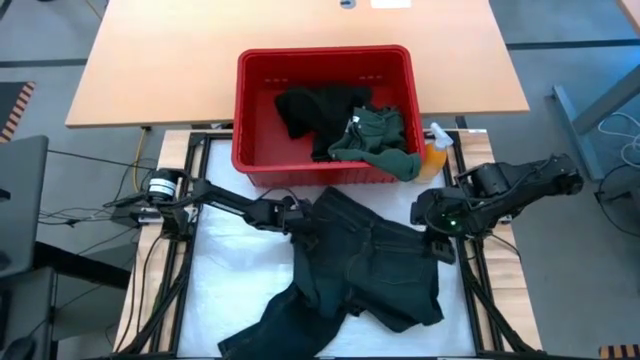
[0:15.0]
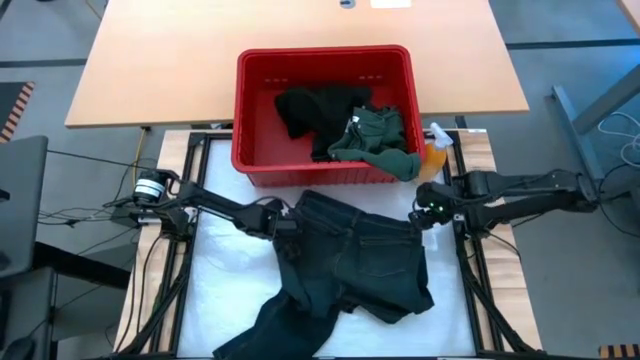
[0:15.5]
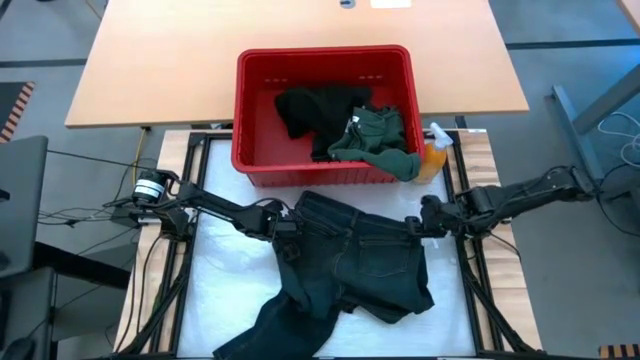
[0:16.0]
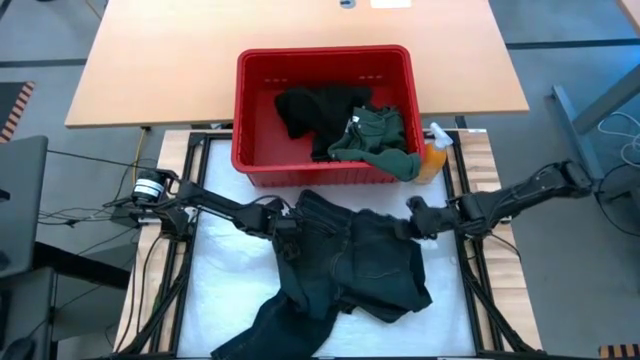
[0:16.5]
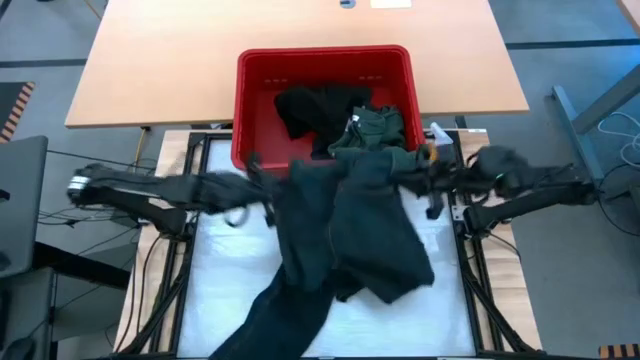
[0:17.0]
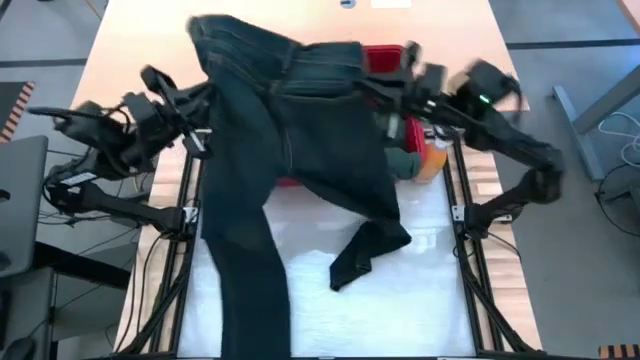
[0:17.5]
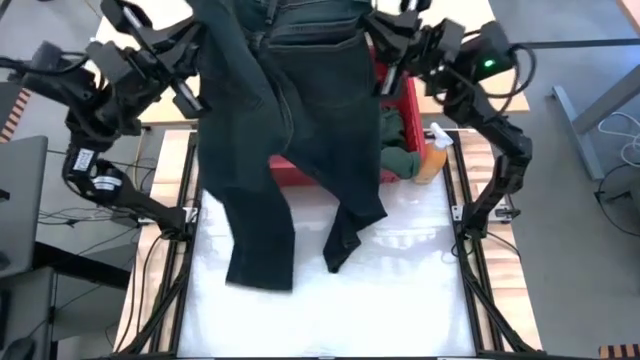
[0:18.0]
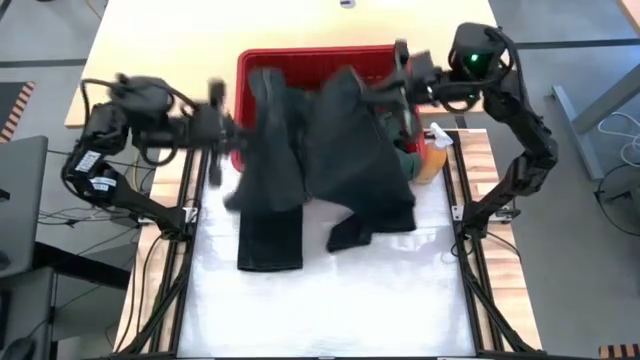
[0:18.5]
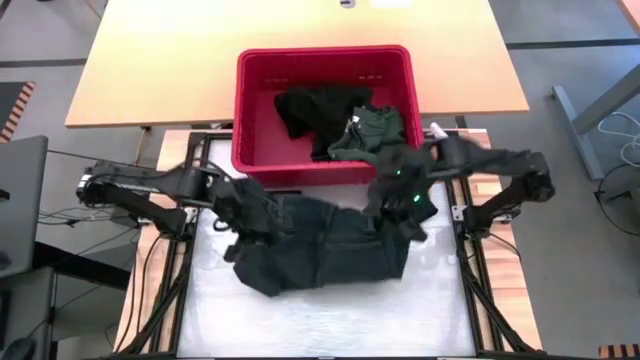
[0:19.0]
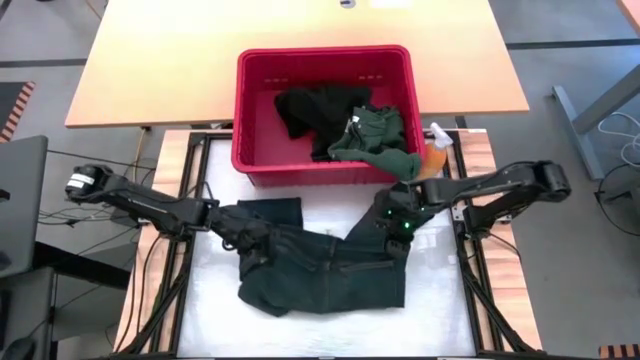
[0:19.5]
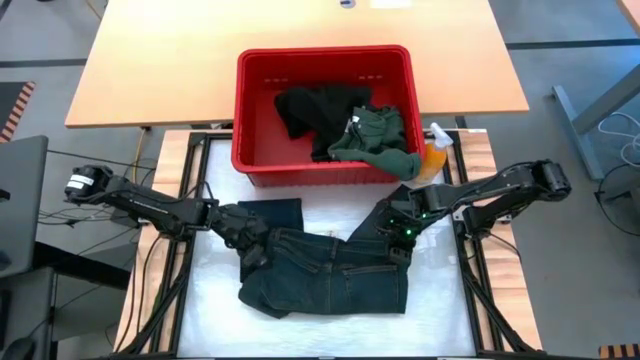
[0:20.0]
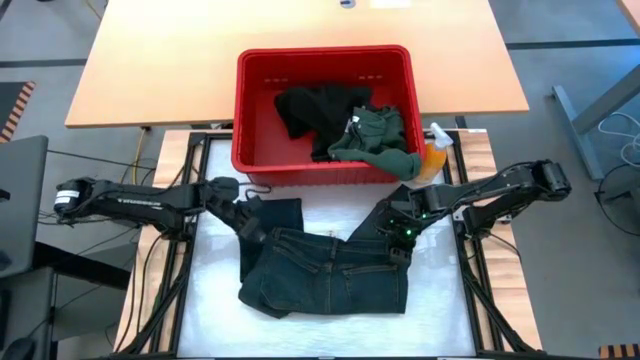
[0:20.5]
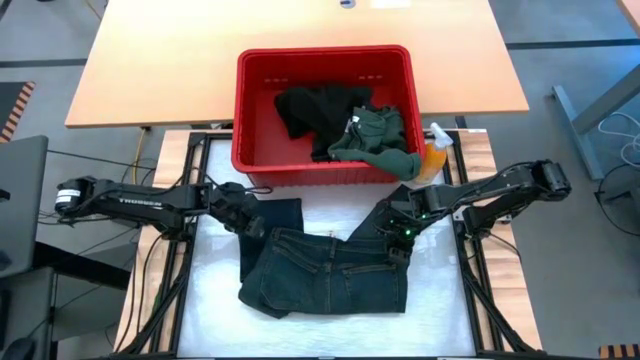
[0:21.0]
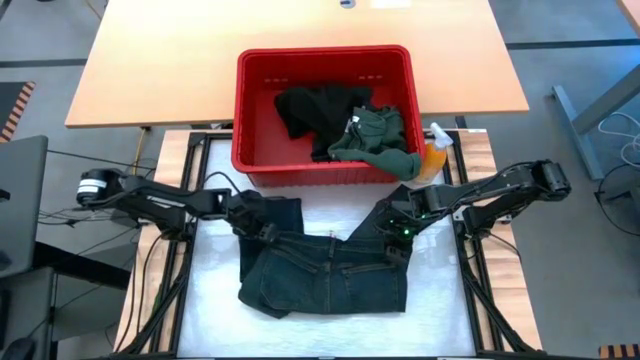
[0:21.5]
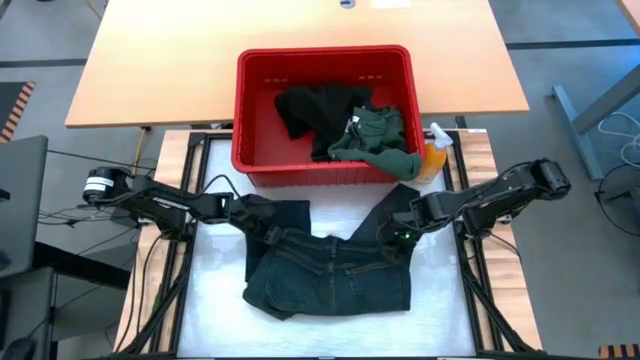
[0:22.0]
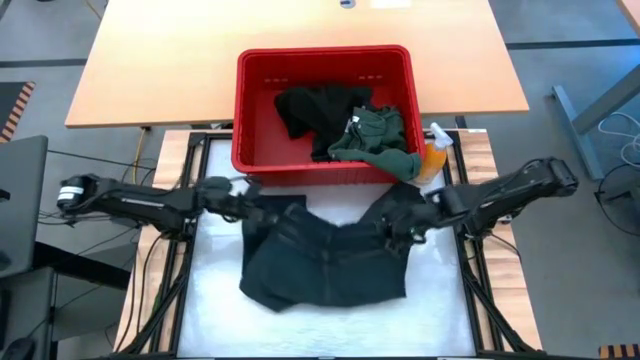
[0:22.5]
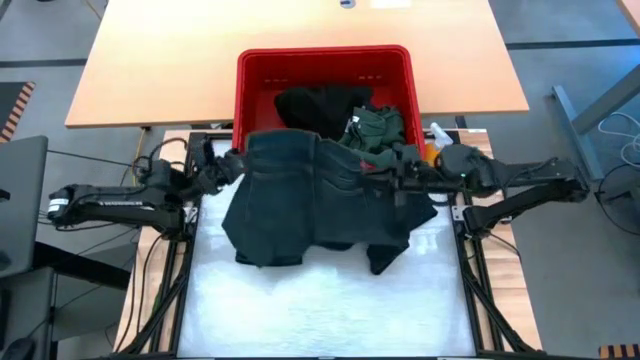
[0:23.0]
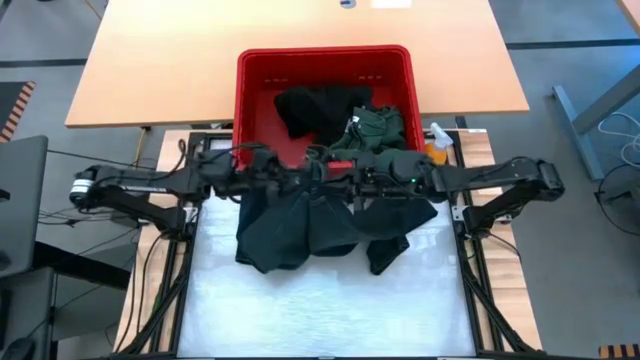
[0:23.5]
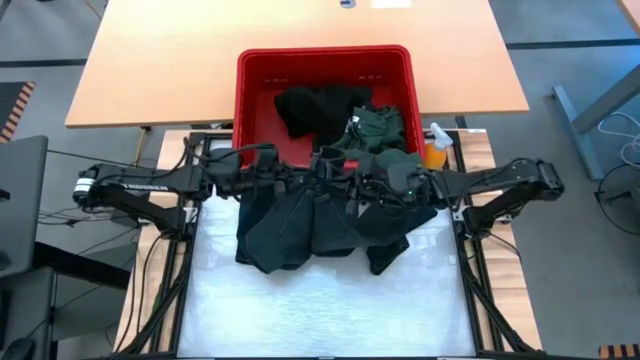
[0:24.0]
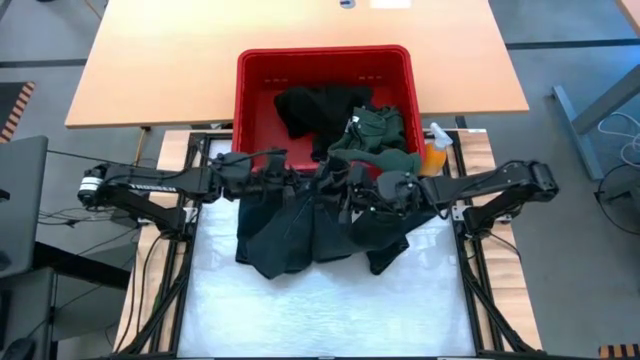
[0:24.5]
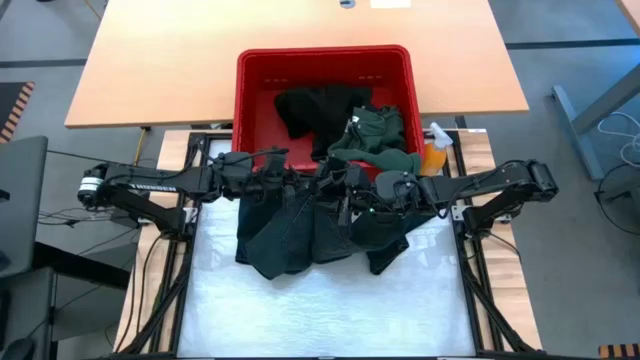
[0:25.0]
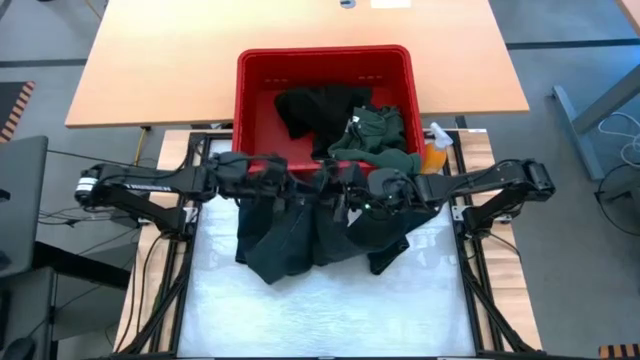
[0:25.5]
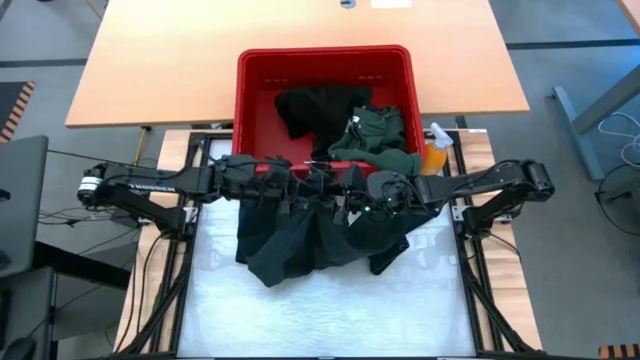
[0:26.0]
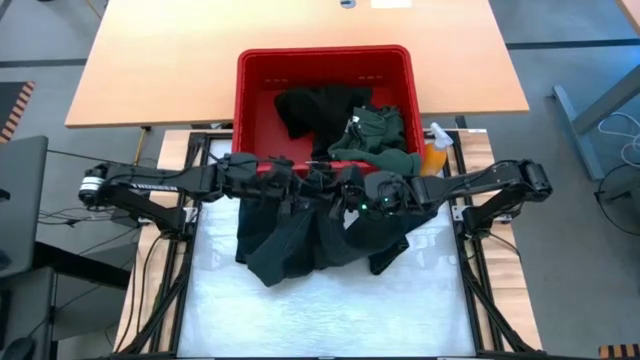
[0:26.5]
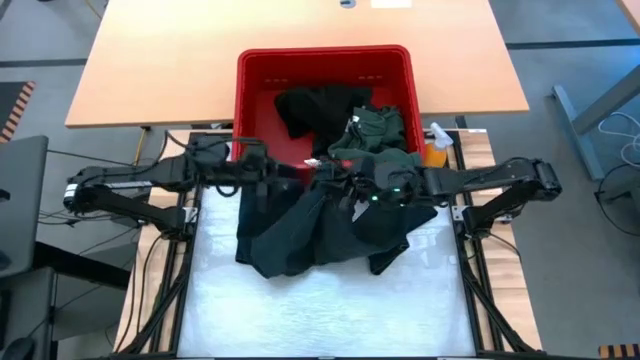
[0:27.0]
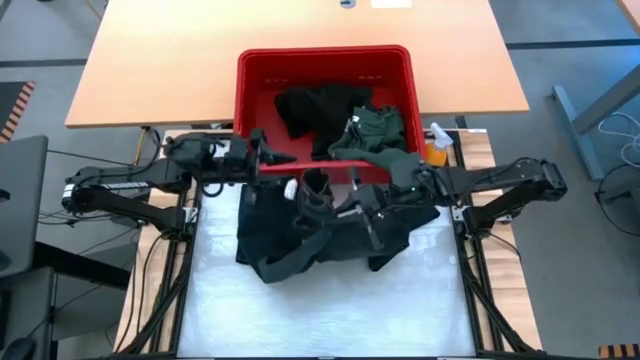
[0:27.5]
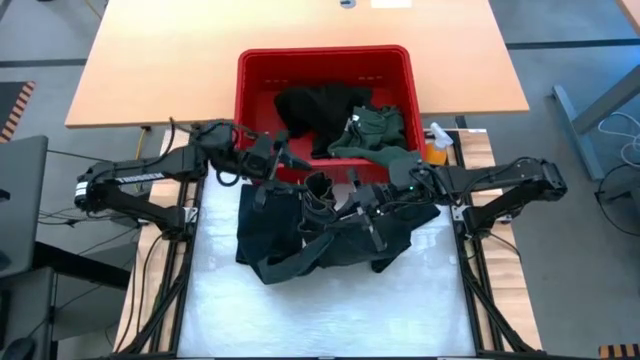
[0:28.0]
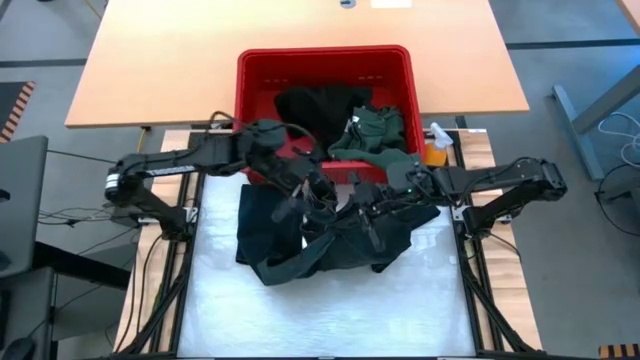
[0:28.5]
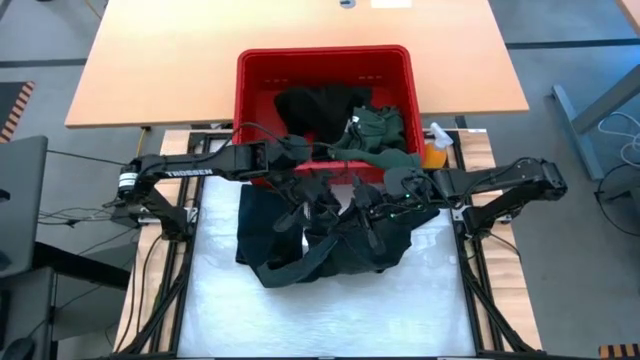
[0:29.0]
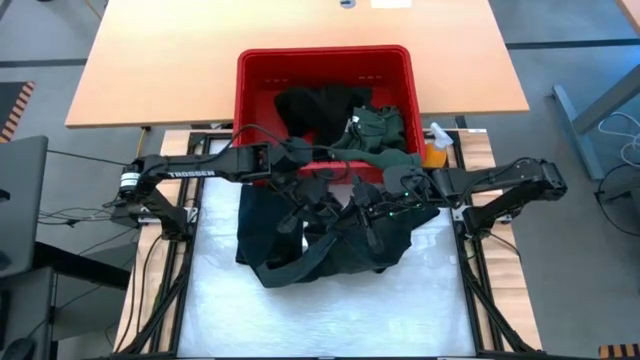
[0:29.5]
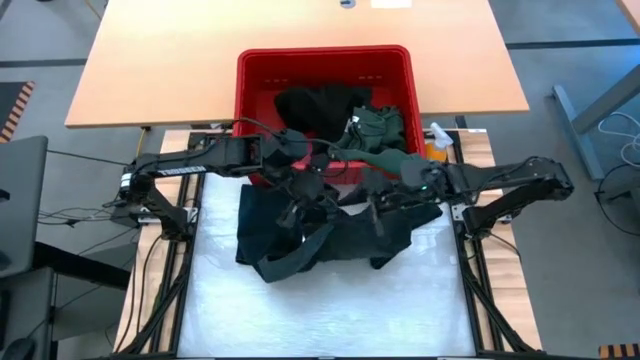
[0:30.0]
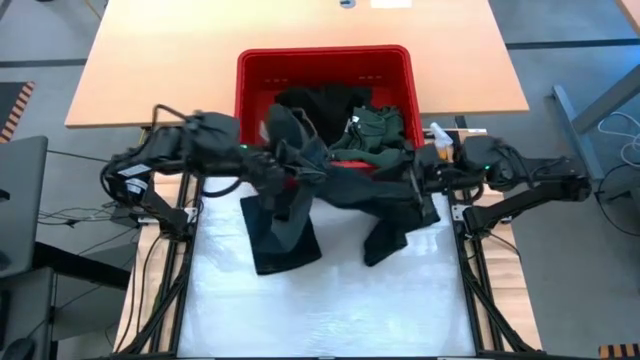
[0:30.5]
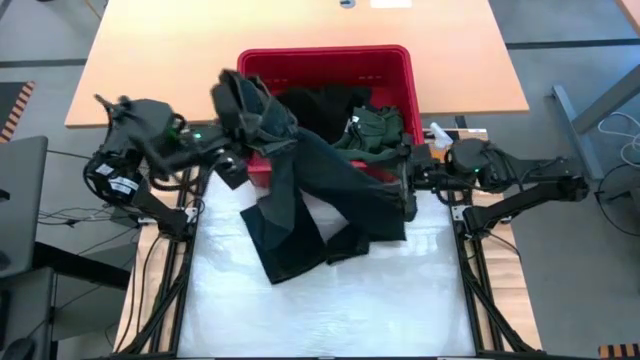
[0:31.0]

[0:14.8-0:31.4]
Task: Fold laundry
Fold the black pants
